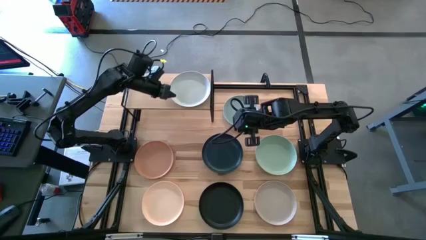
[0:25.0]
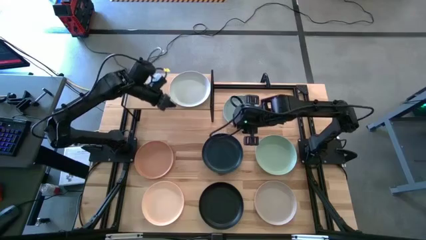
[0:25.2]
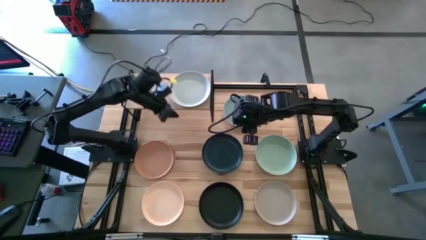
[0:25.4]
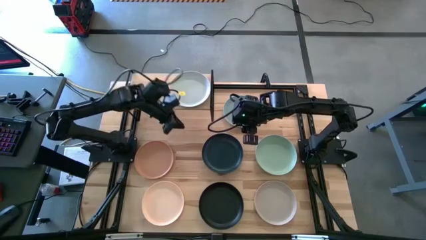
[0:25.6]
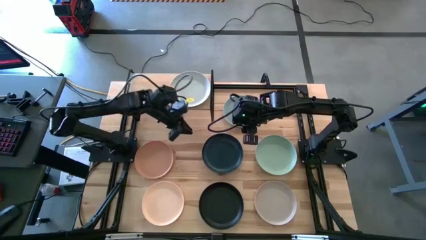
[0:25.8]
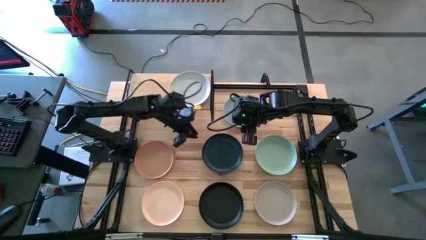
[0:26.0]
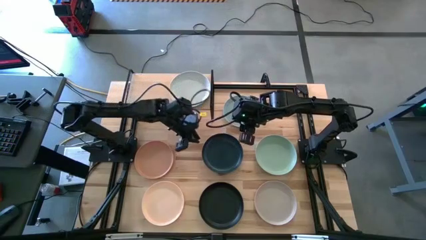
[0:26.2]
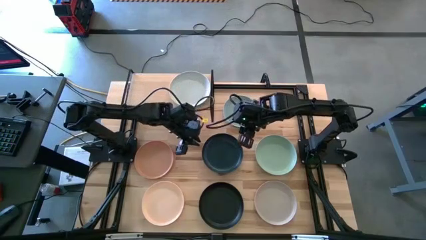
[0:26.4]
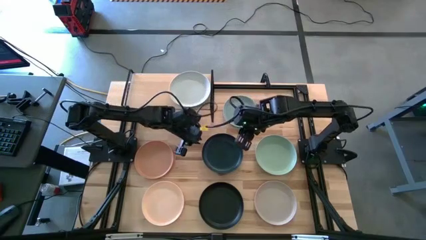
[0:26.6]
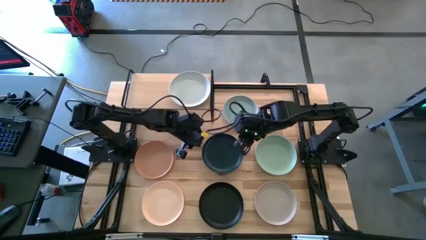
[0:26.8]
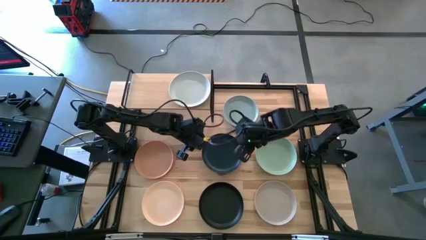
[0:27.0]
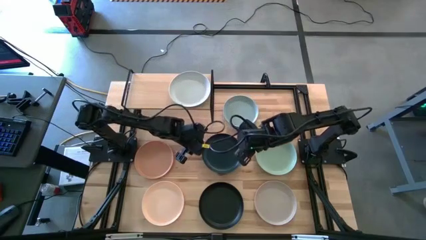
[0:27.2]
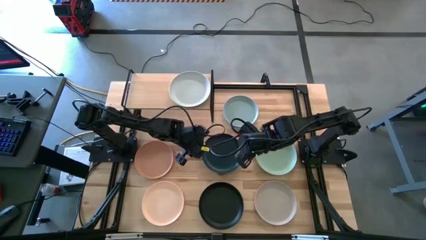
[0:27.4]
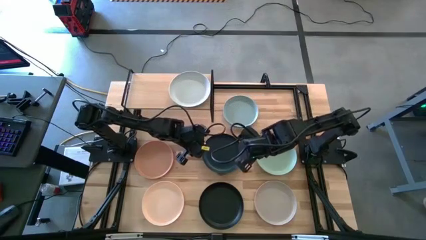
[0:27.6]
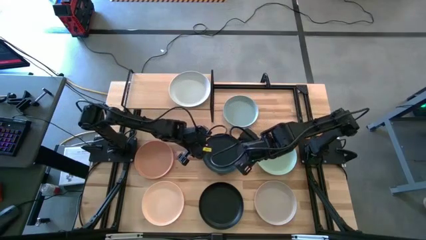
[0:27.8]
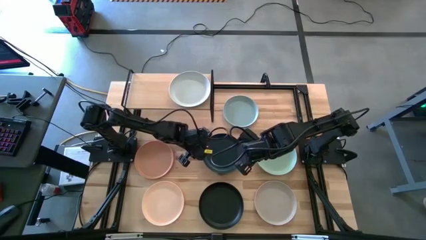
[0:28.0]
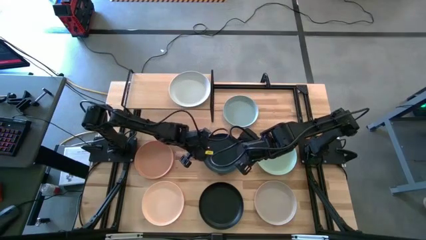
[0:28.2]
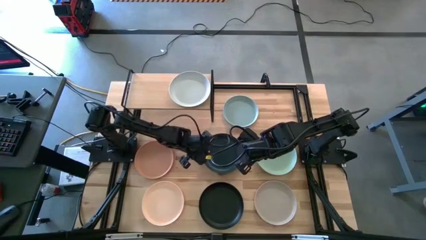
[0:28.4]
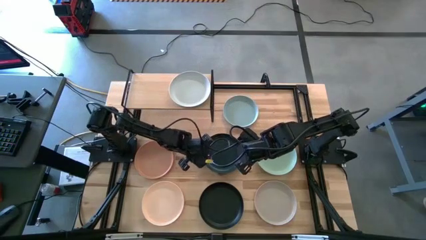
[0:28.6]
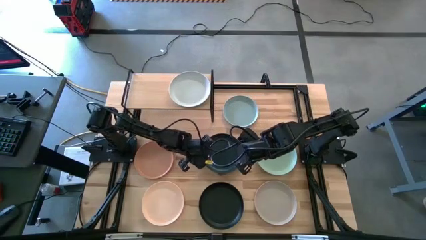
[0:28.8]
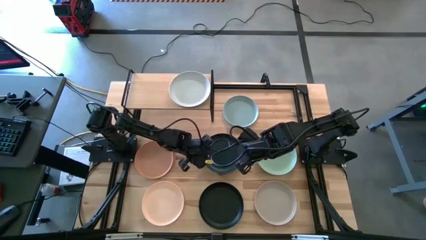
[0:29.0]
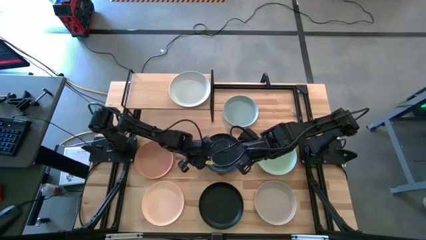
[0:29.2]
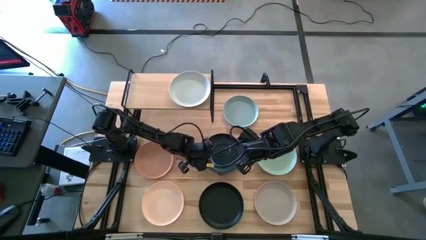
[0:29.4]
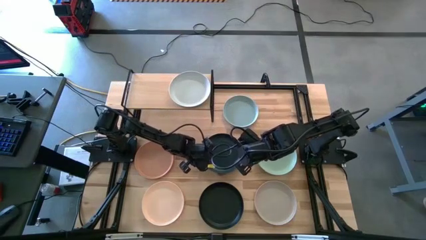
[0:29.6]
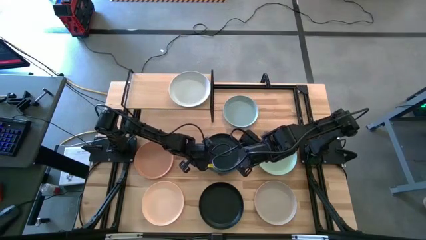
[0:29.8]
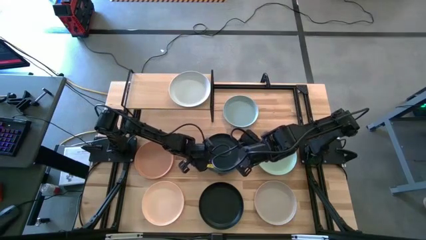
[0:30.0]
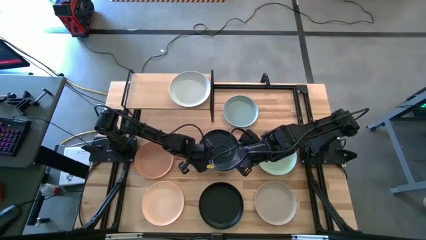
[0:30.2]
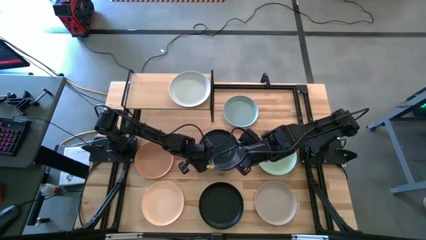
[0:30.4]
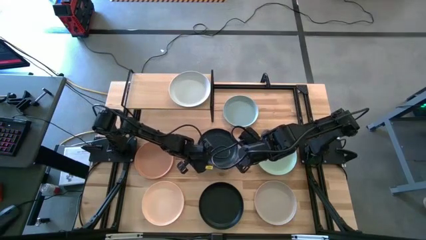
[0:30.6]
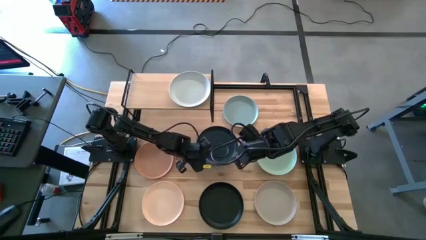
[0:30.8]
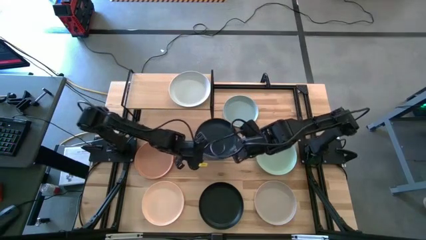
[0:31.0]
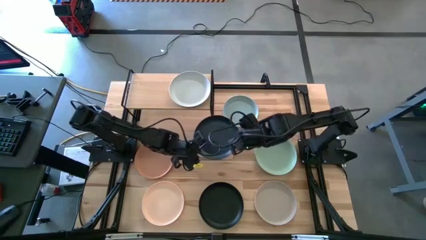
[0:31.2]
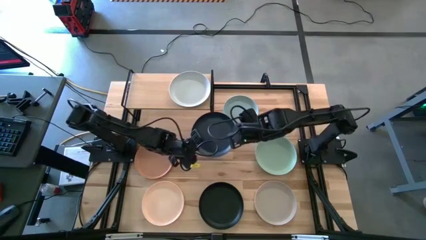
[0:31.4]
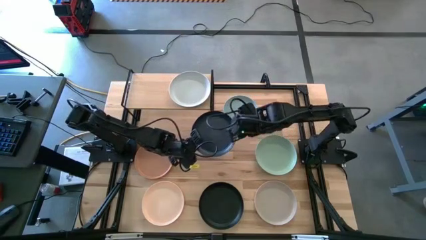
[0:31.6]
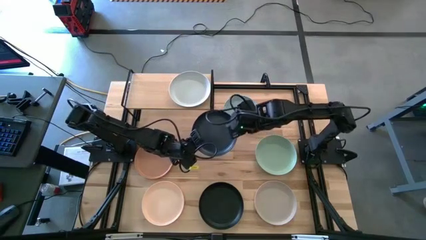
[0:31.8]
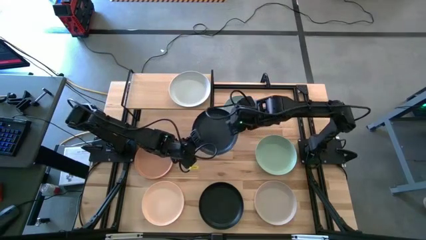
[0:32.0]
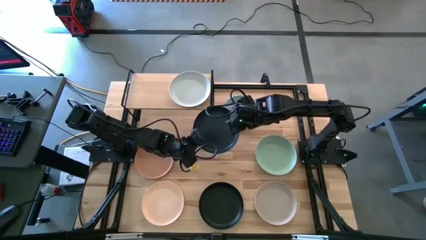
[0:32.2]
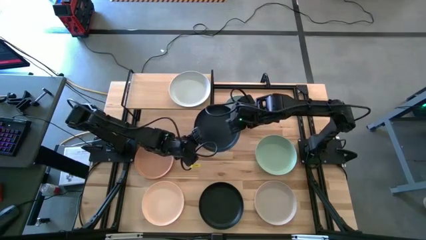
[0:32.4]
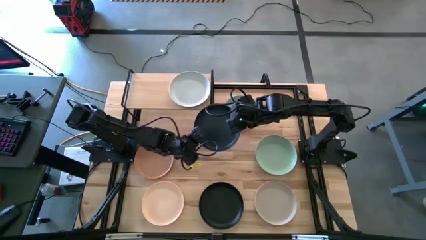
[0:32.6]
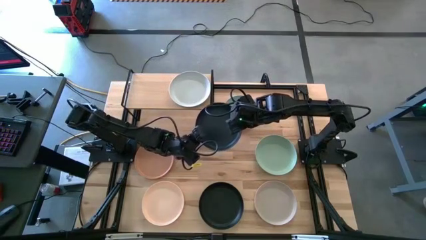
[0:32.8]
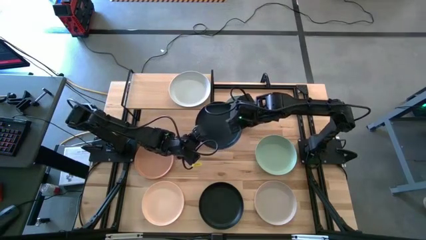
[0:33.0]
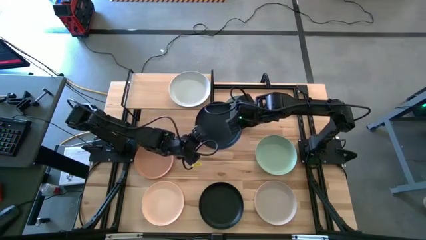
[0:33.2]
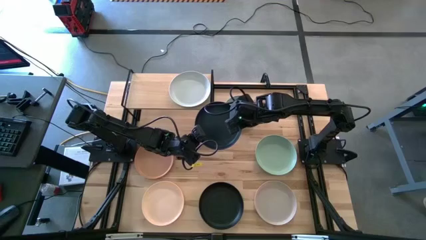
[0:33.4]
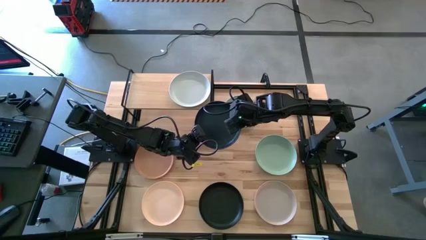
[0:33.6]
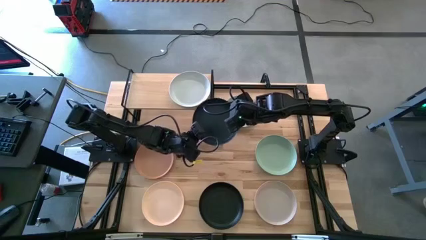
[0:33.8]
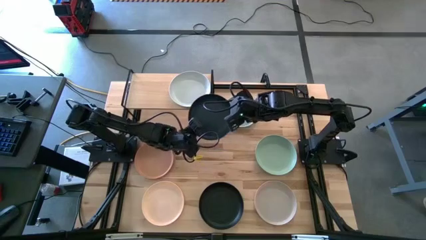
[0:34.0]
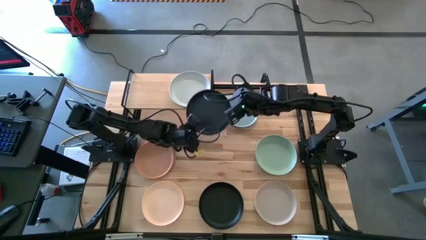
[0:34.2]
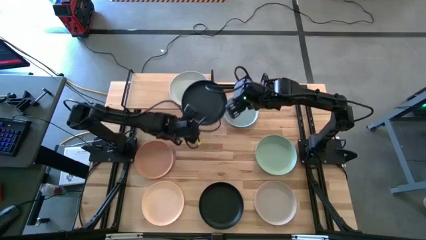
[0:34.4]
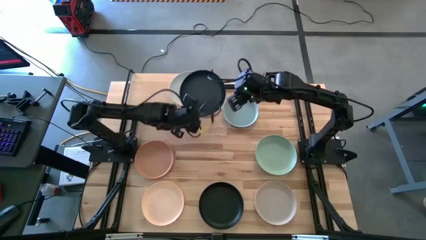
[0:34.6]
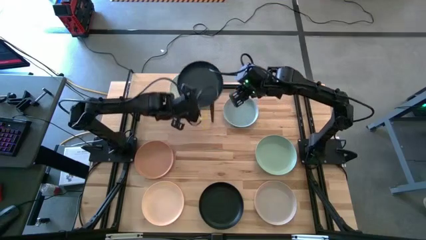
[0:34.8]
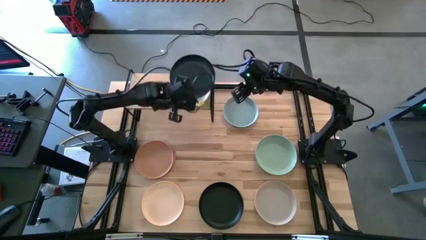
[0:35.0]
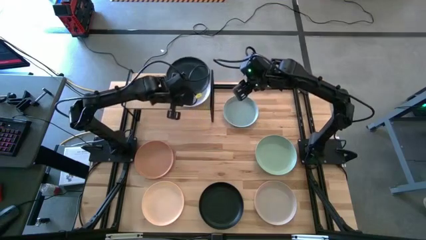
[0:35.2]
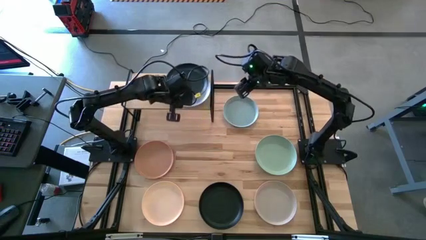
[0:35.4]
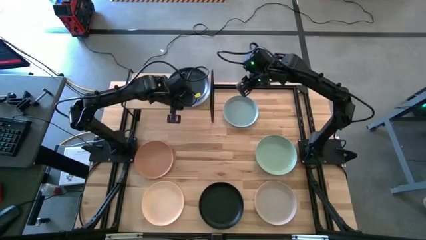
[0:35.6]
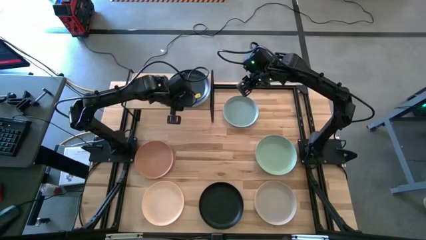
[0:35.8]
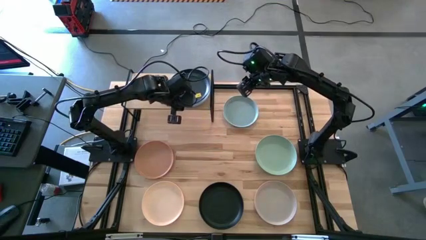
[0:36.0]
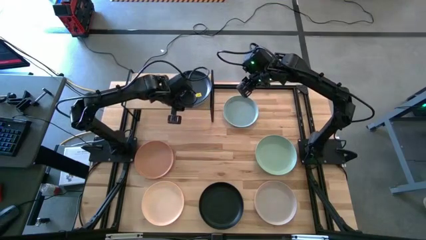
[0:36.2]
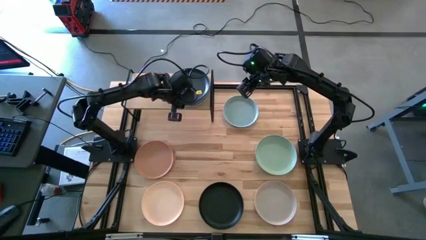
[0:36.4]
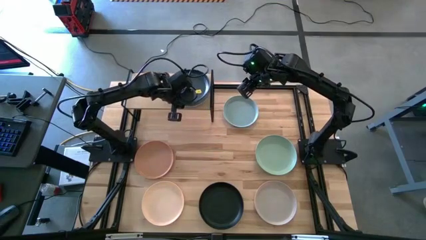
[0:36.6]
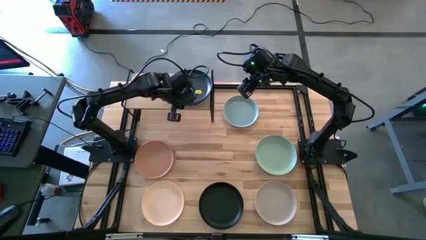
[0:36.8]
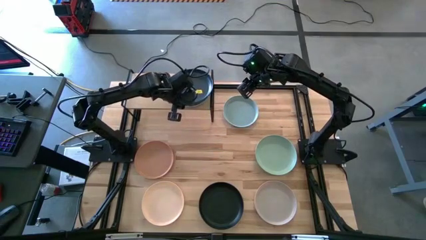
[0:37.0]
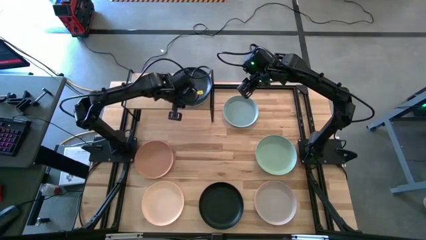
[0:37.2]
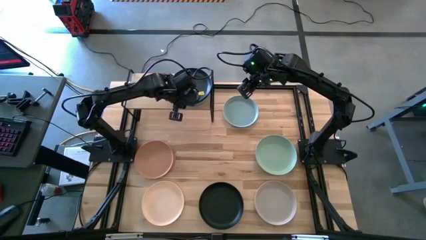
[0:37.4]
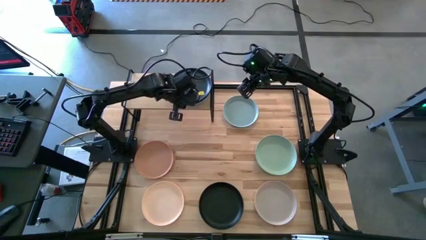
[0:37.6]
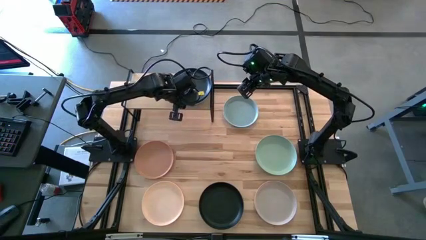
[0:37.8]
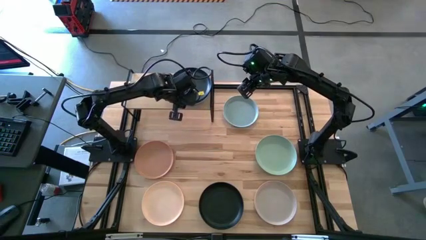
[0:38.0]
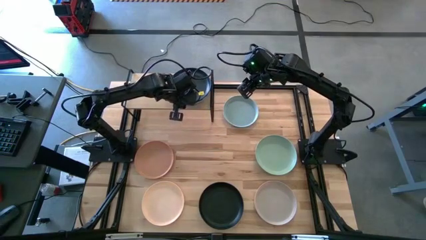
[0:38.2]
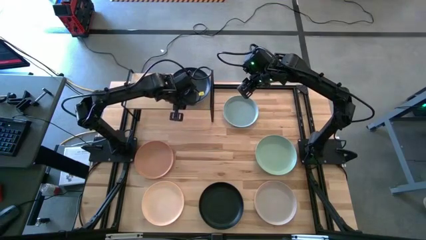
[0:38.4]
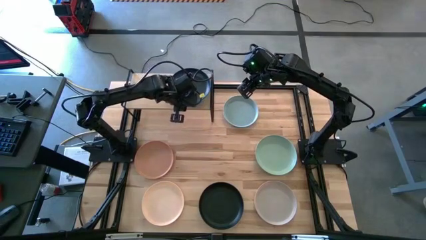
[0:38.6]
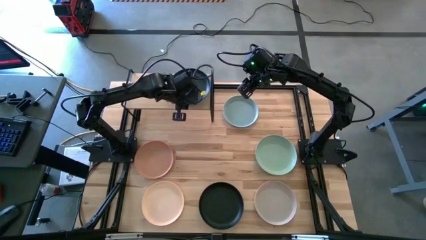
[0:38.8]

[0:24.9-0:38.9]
Task: Place and stack plates onto a shelf
Stack the dark blue plate on top of the white plate on the shelf

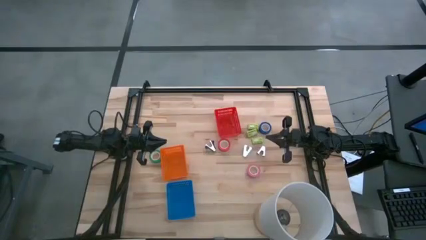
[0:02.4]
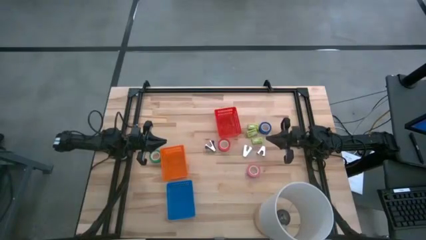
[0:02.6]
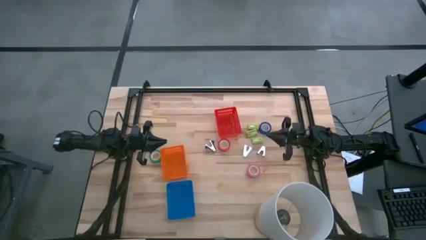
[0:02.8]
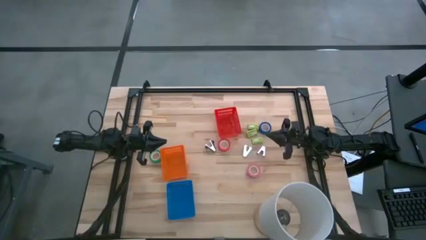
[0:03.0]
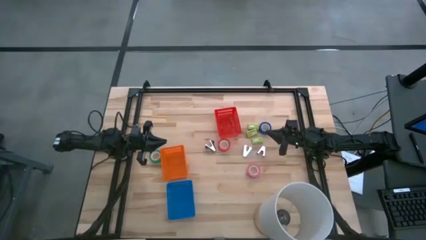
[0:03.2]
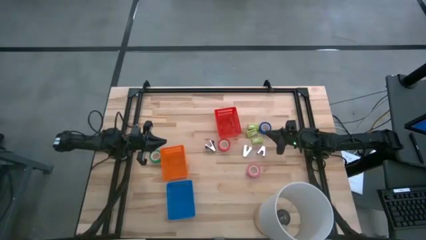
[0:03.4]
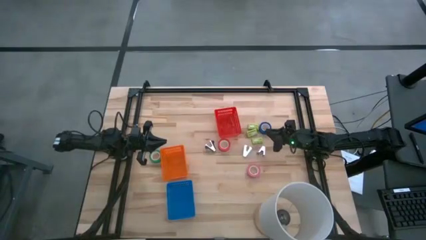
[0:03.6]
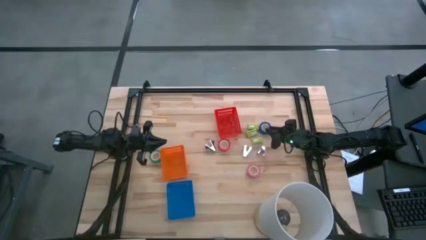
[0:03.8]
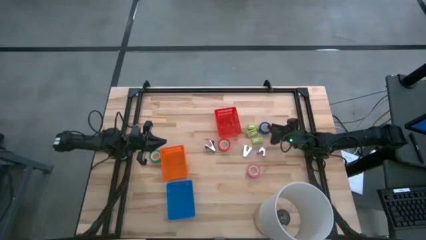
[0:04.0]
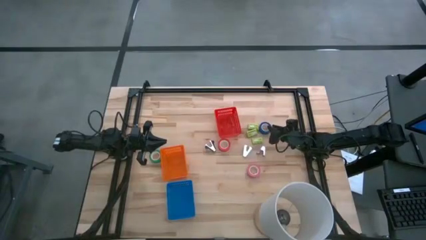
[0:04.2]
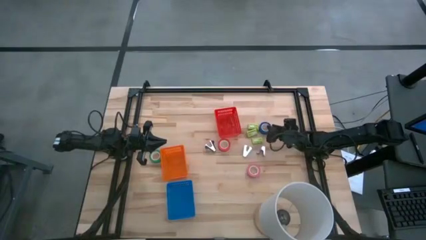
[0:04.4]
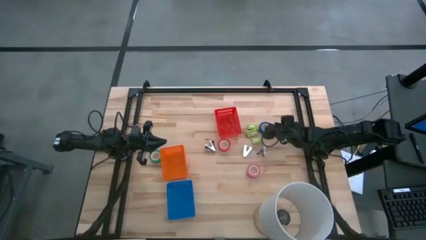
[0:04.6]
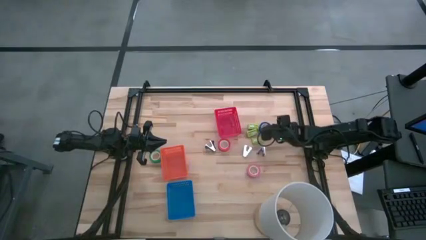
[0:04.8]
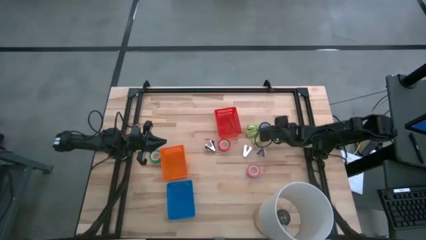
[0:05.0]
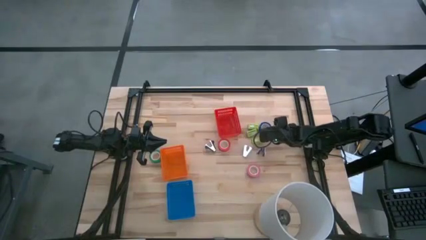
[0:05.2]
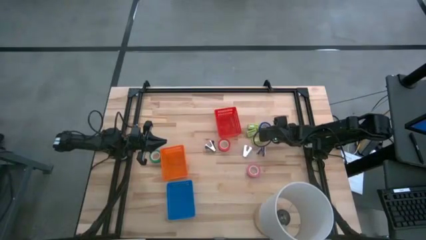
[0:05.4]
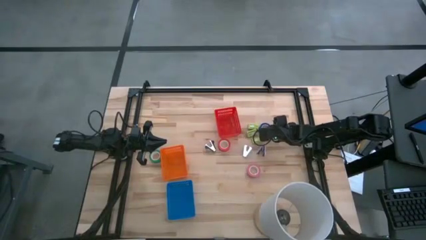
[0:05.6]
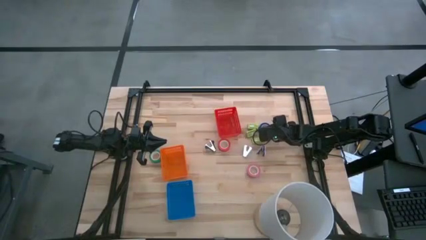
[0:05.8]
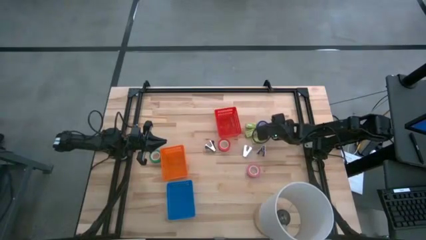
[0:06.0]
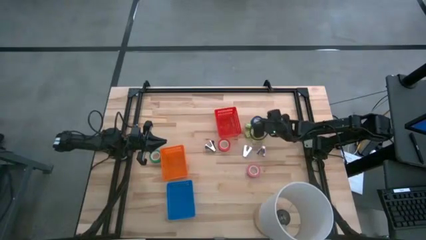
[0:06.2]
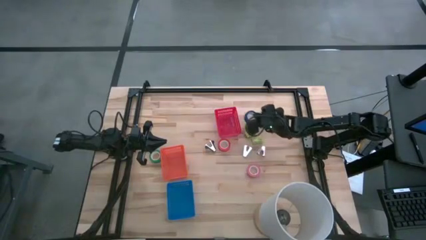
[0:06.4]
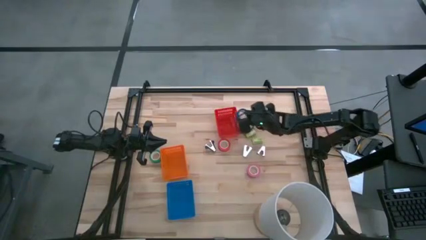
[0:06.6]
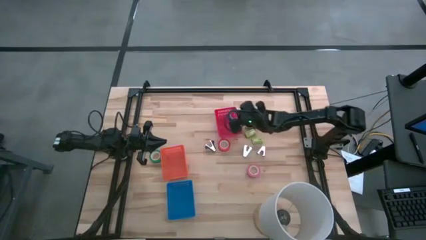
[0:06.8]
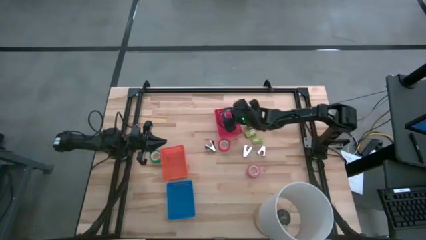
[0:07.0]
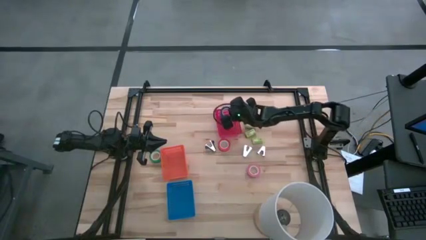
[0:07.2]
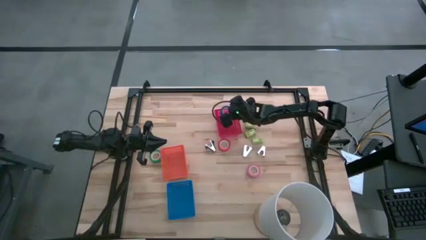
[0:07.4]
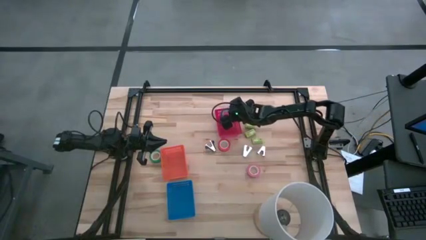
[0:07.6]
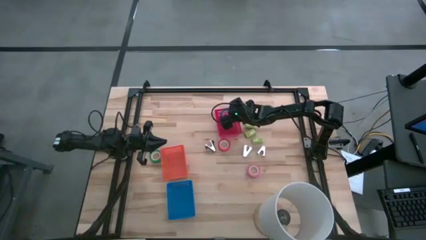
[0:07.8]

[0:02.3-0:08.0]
Task: Pick and place Stapler, Stapler remover, tape
Put the blue tape into the red bin
